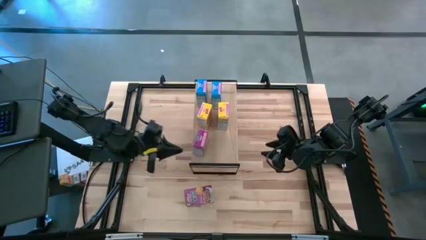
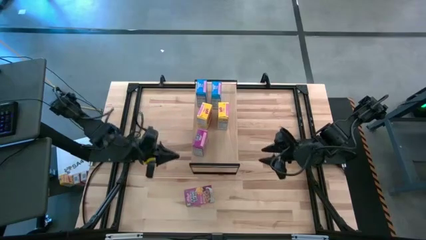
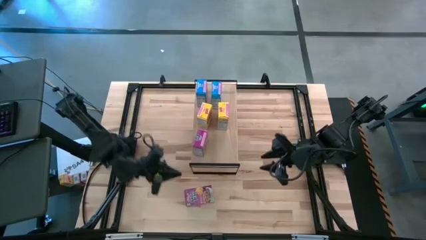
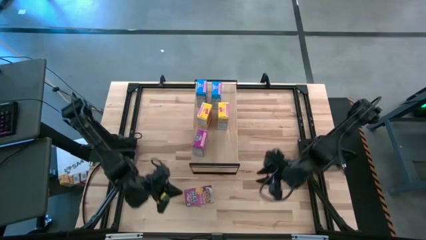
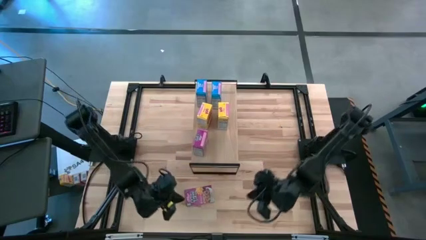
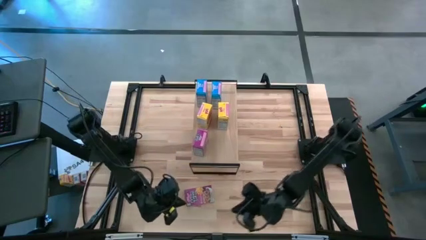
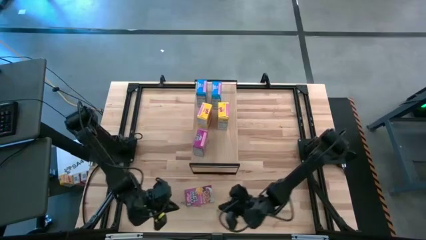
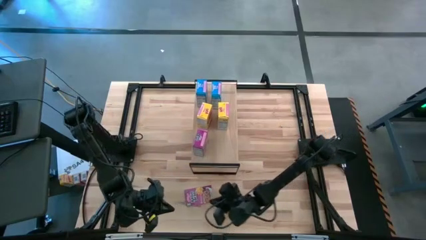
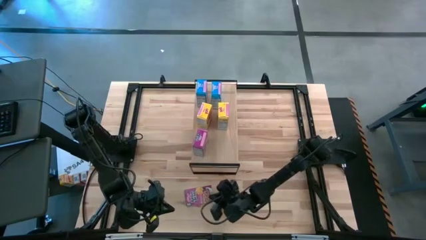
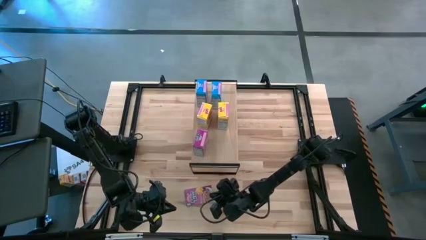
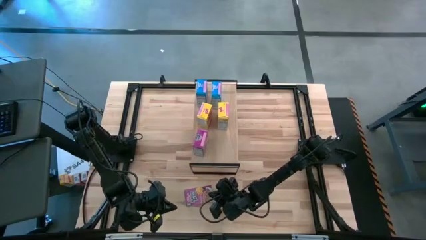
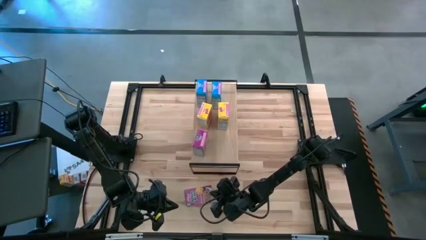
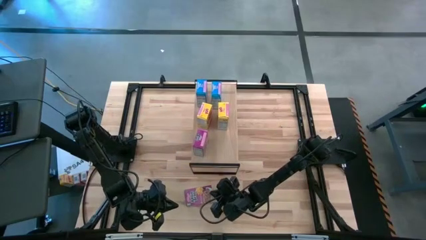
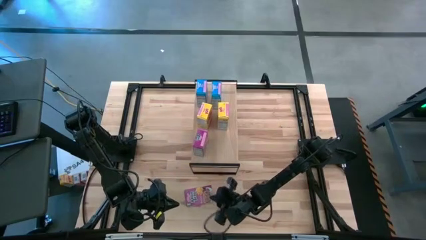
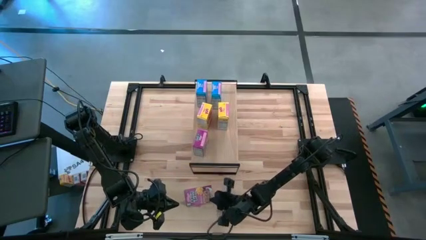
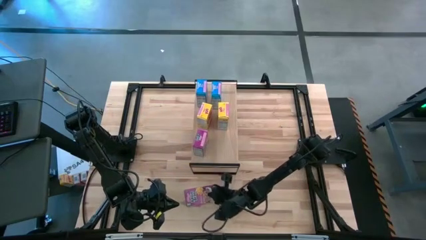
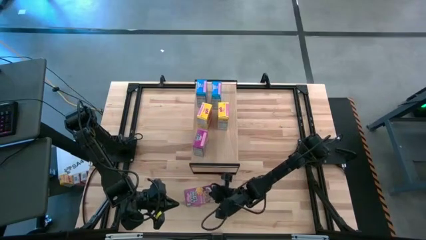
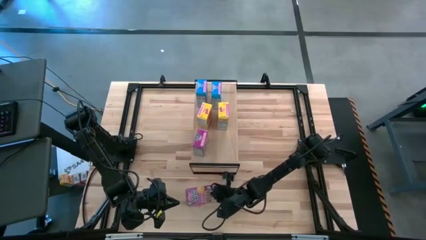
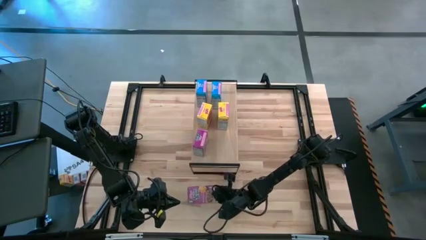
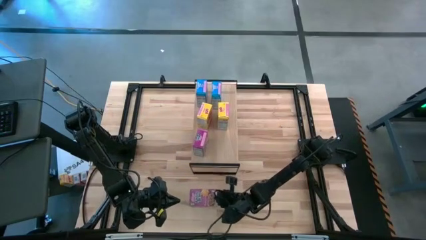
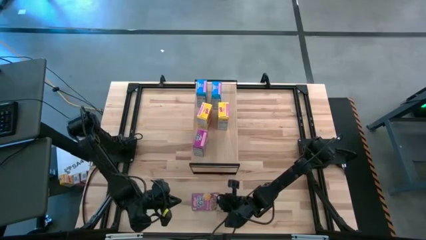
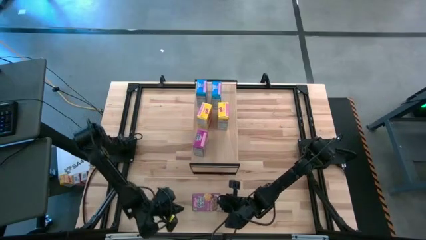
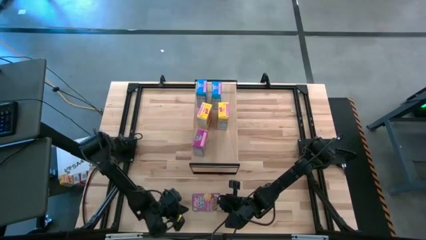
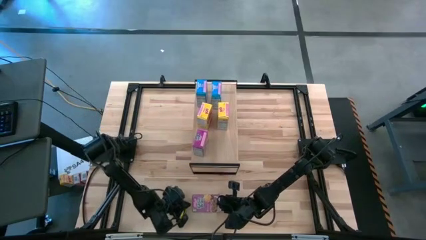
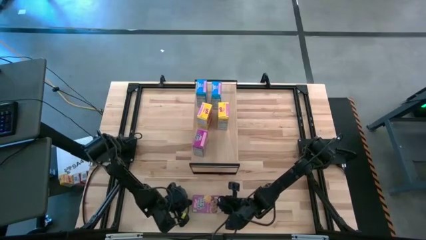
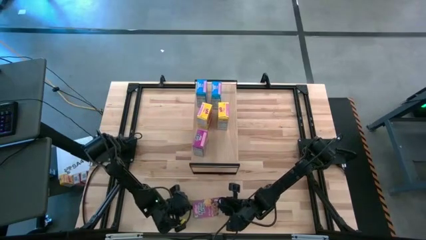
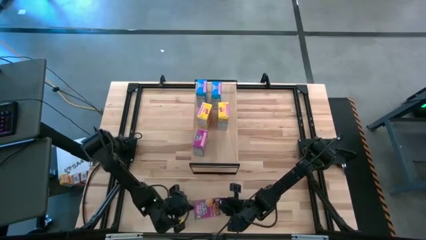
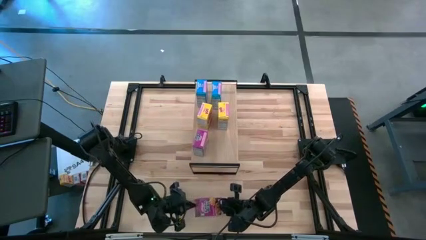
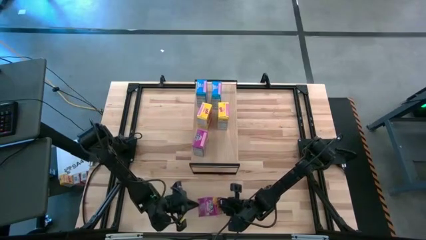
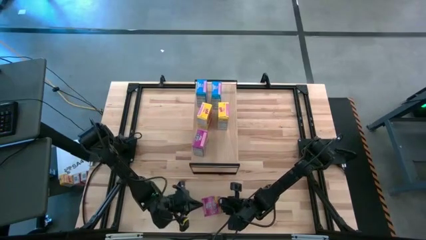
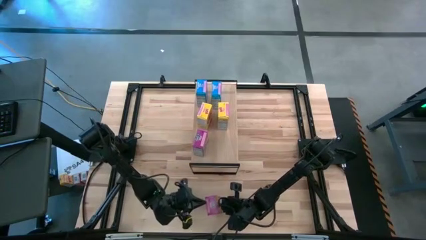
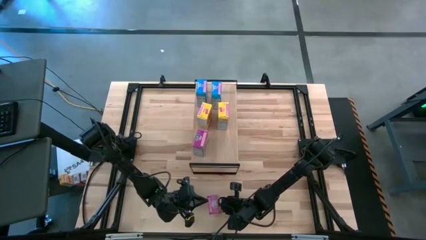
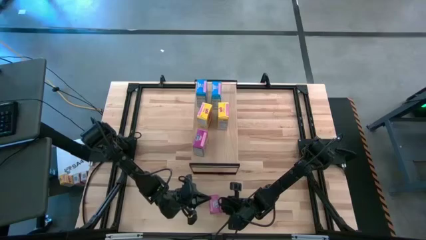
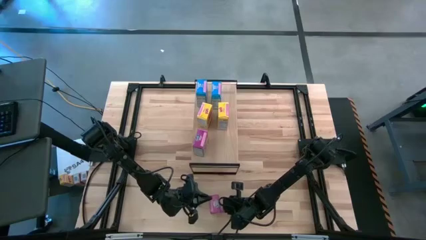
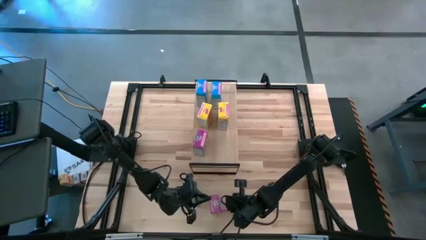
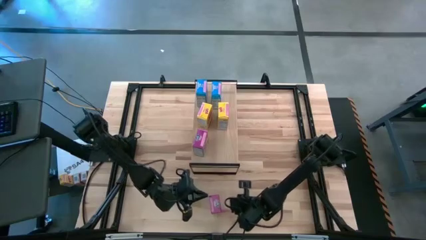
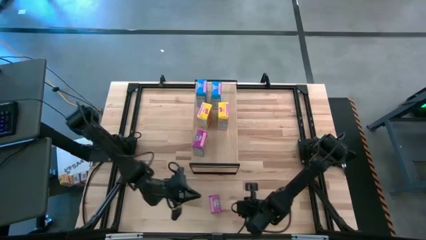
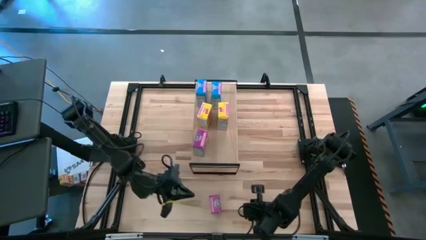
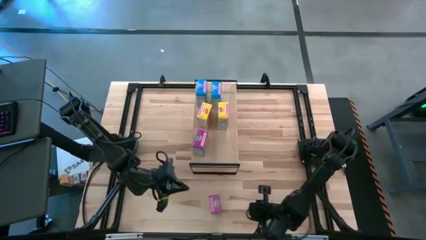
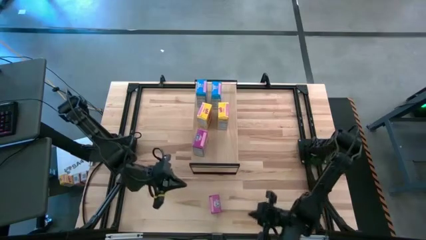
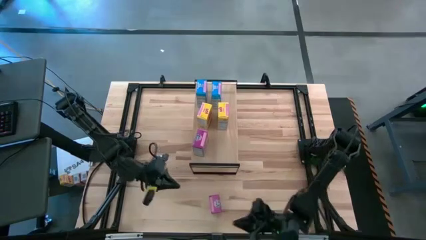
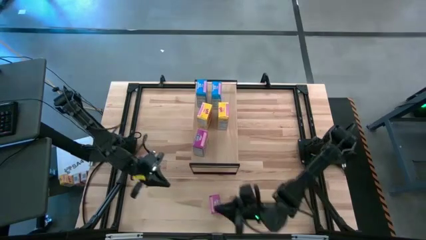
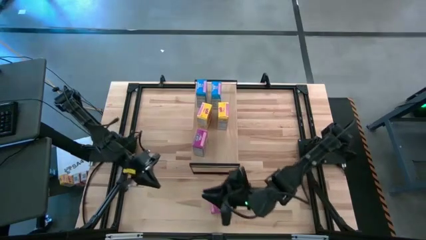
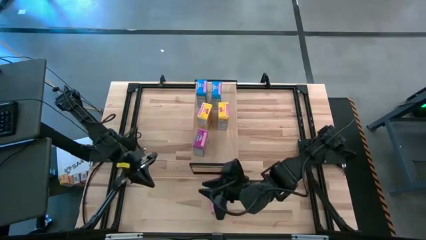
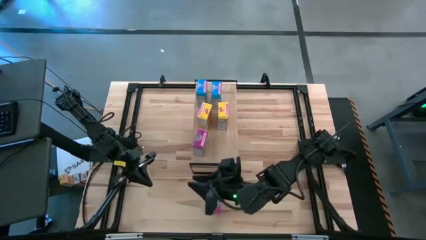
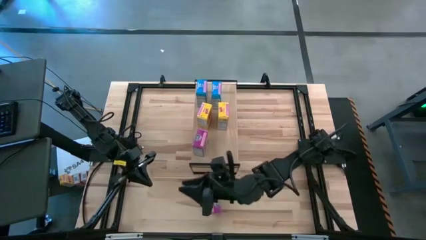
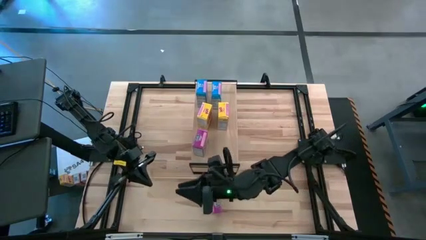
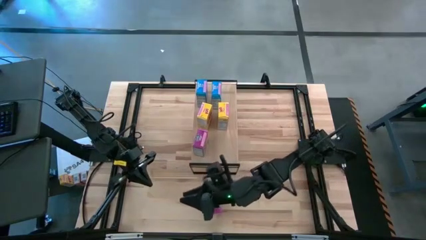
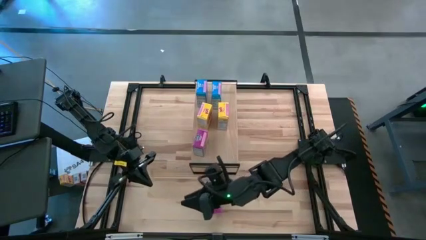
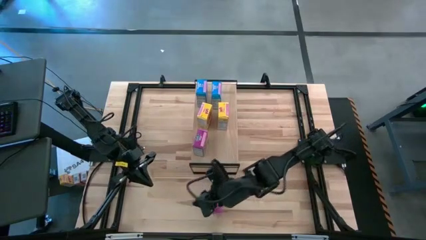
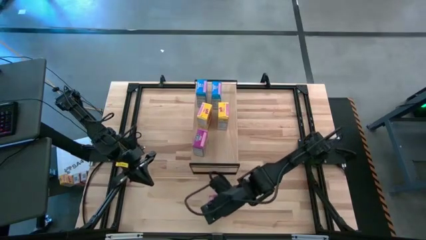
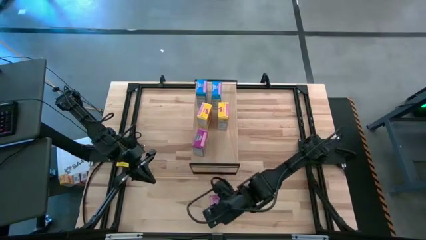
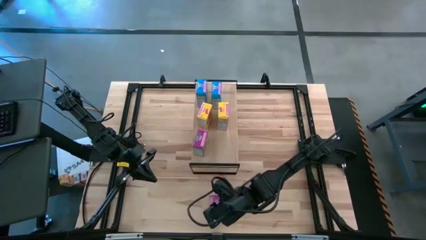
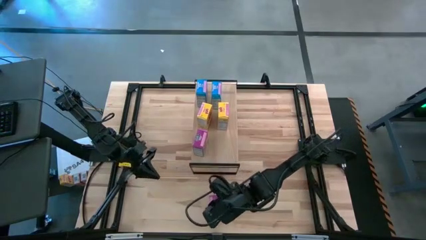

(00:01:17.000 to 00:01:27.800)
Task: Stack cereal on shelf
Put the purple cereal box on the shelf

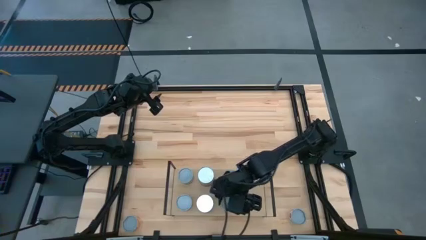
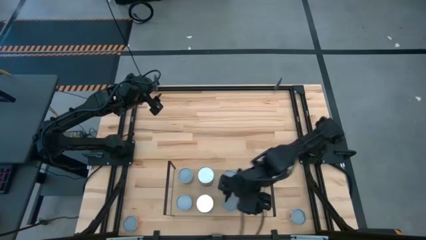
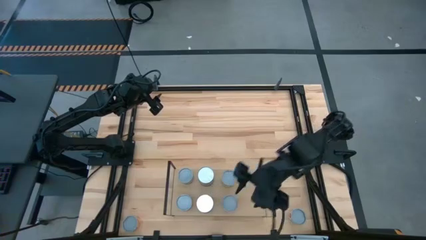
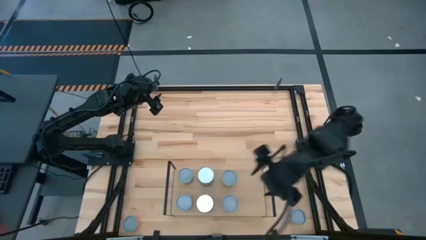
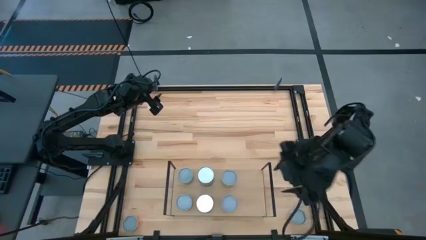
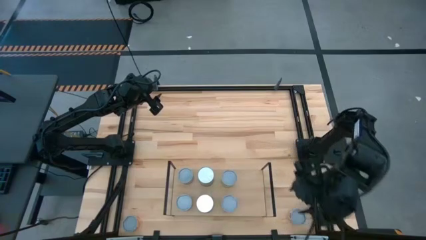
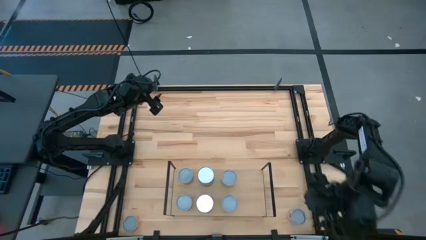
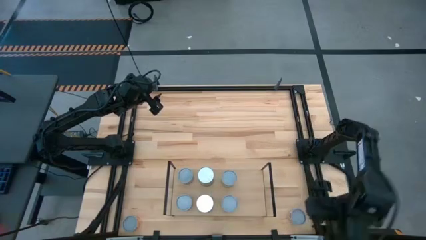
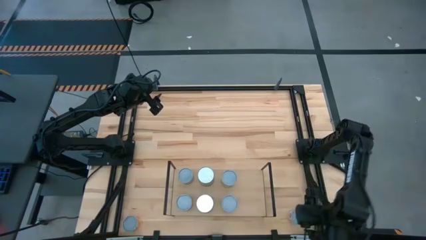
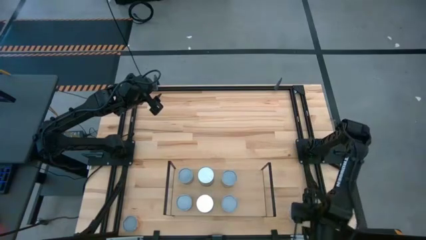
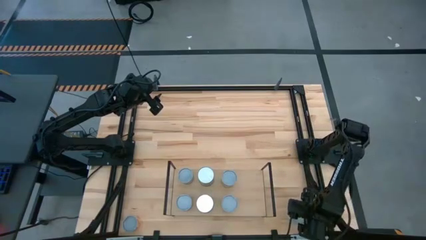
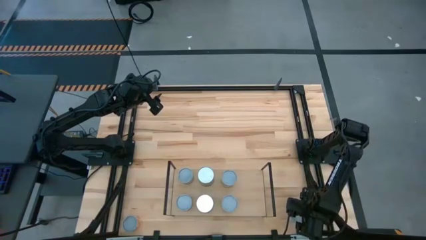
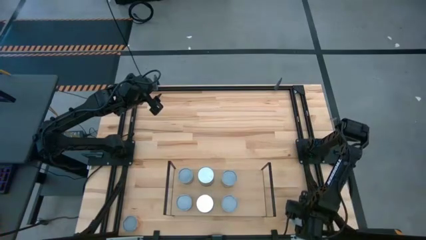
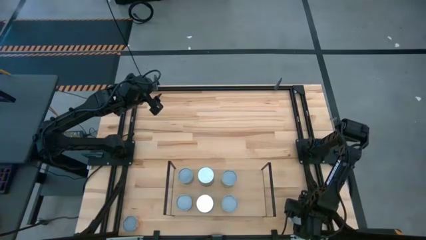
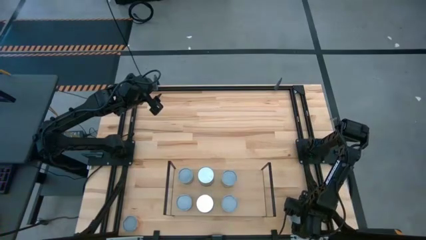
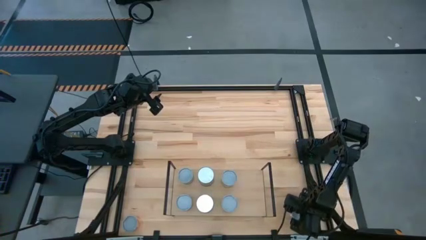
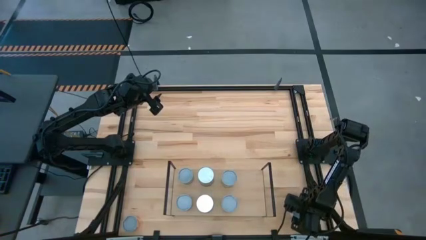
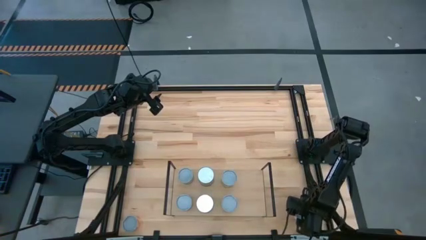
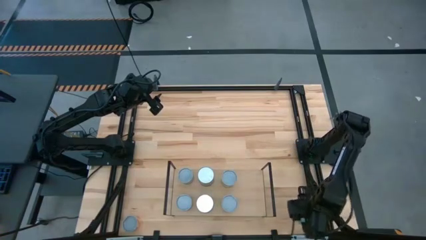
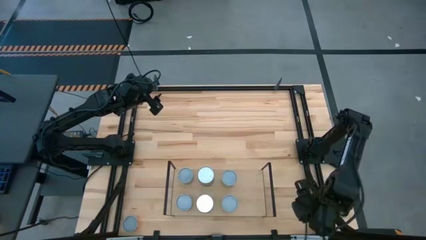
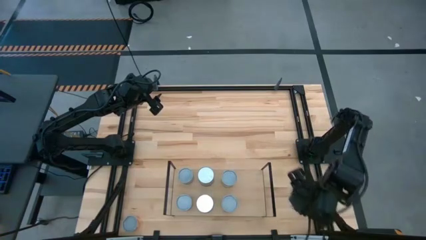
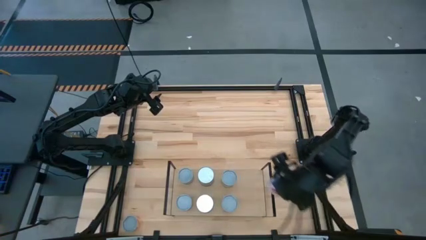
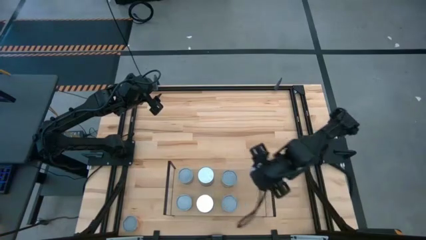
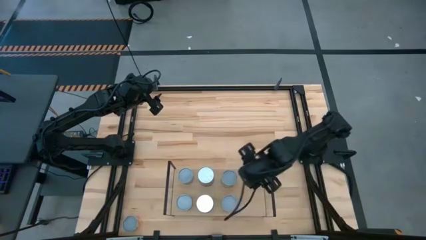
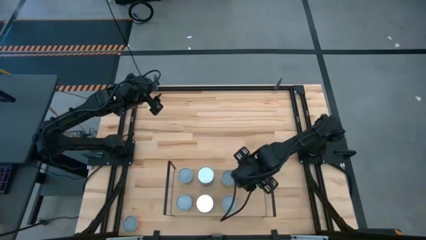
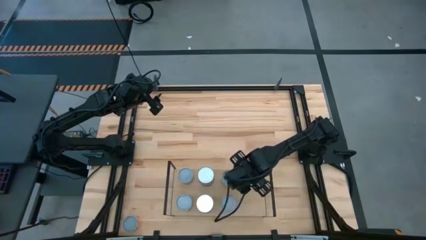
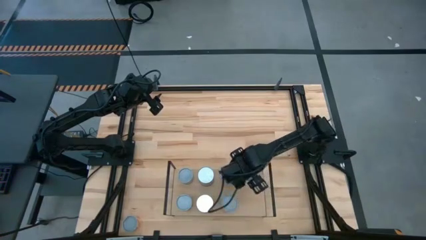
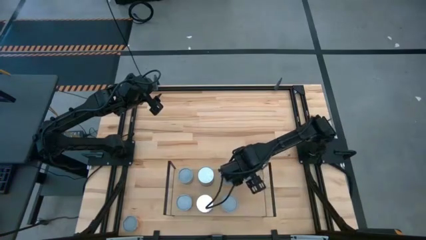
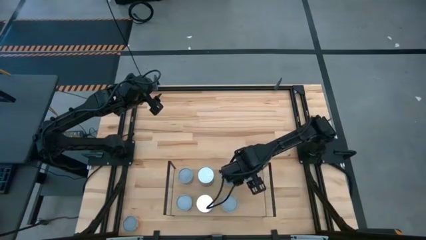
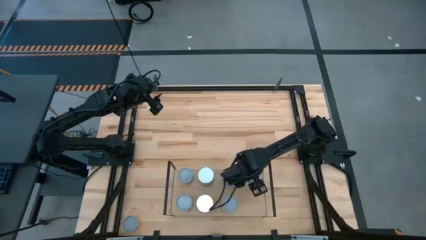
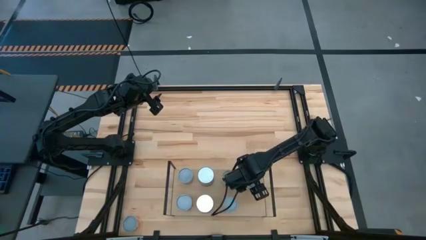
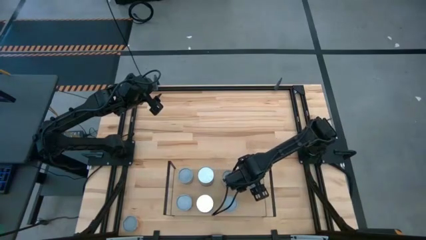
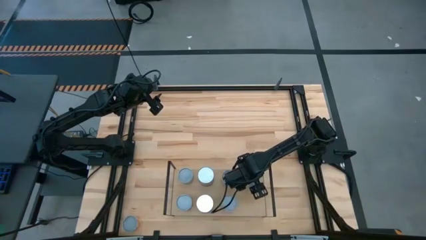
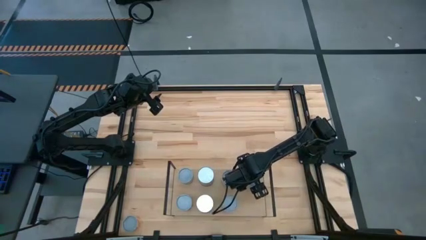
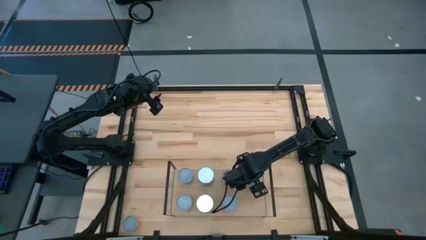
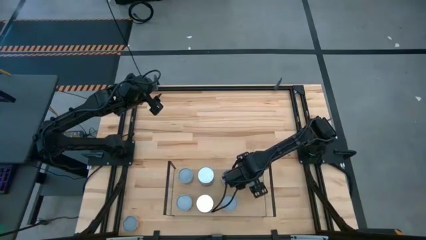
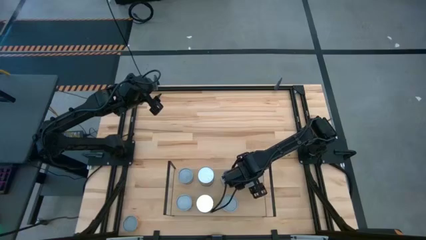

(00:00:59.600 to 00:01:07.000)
Task: Pick and place cans onto a shelf
Put the canned salmon on the shelf
